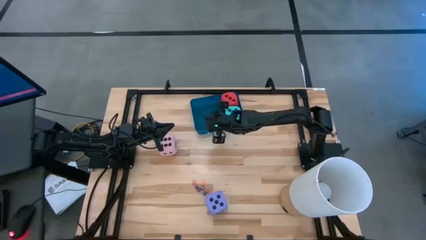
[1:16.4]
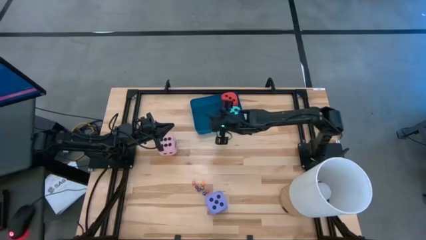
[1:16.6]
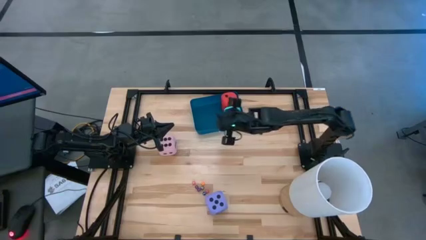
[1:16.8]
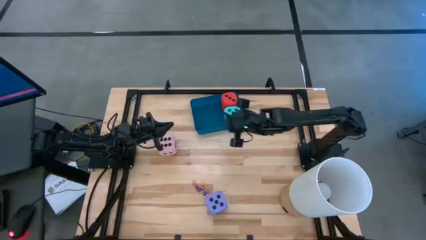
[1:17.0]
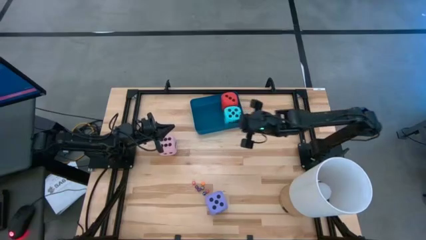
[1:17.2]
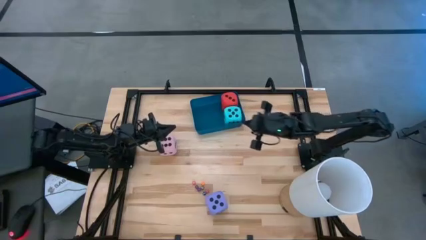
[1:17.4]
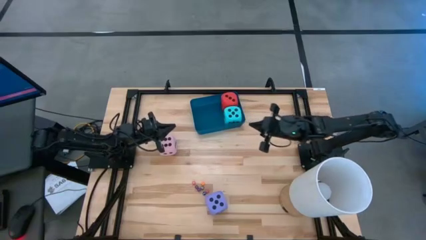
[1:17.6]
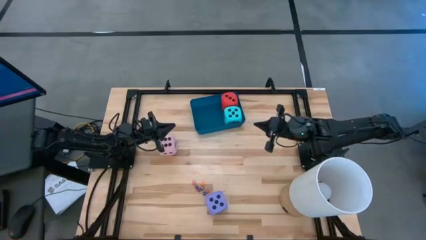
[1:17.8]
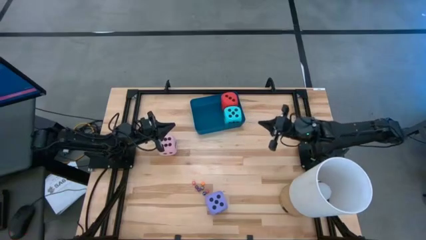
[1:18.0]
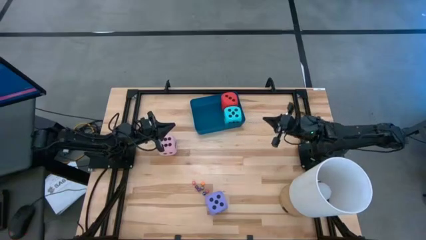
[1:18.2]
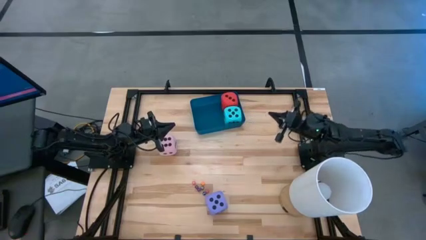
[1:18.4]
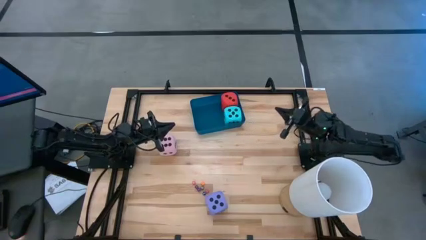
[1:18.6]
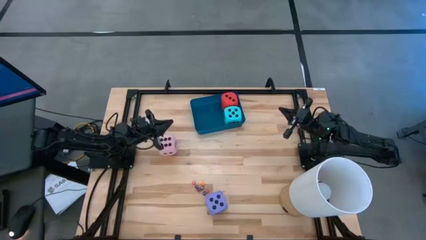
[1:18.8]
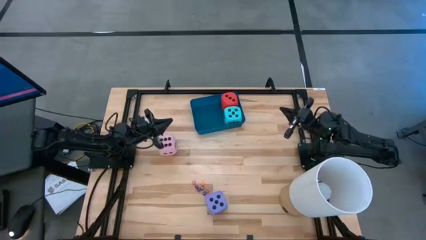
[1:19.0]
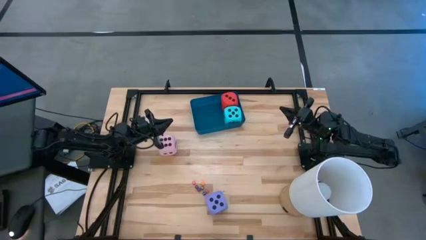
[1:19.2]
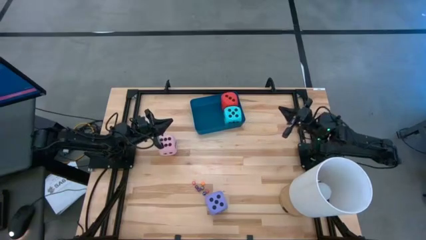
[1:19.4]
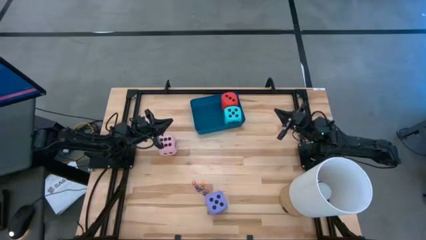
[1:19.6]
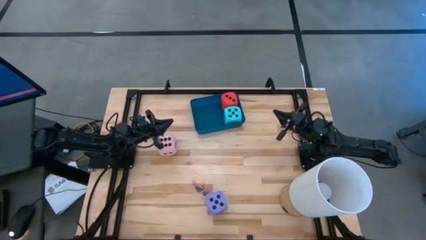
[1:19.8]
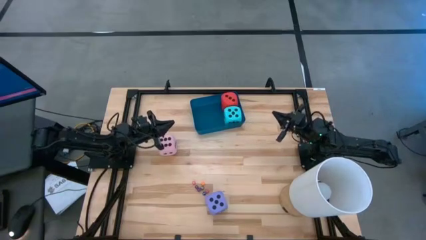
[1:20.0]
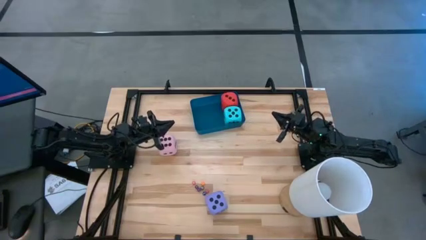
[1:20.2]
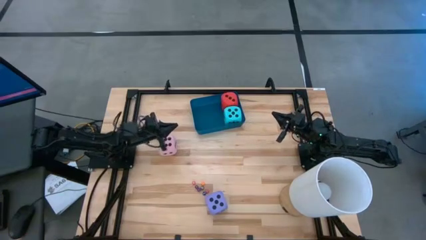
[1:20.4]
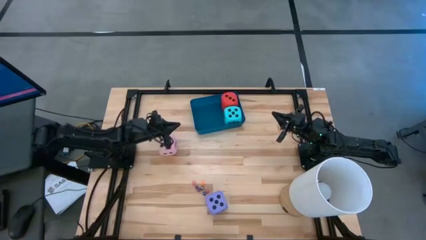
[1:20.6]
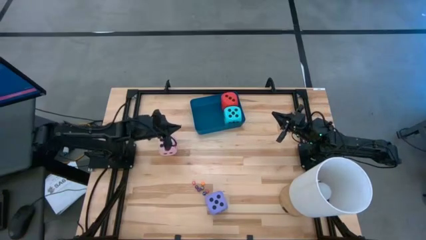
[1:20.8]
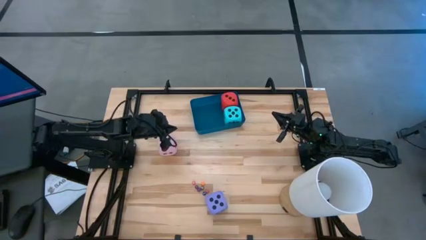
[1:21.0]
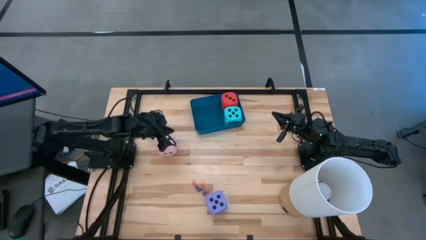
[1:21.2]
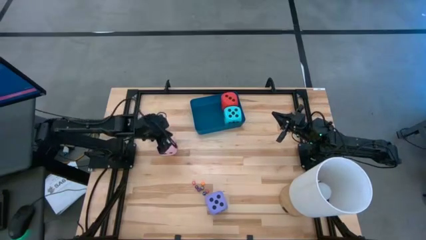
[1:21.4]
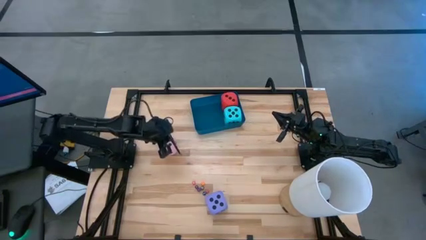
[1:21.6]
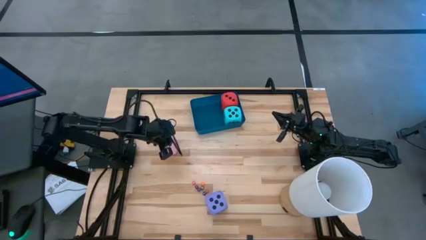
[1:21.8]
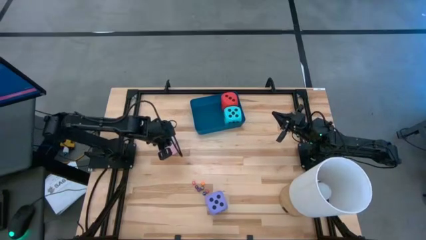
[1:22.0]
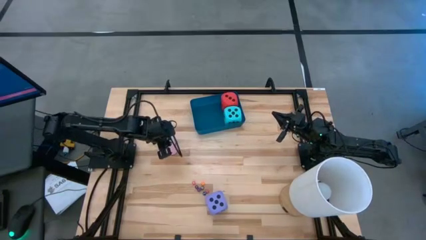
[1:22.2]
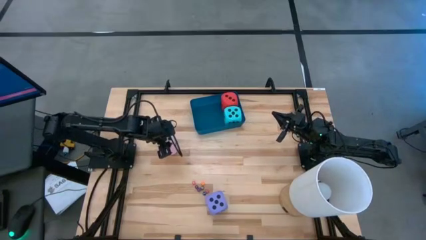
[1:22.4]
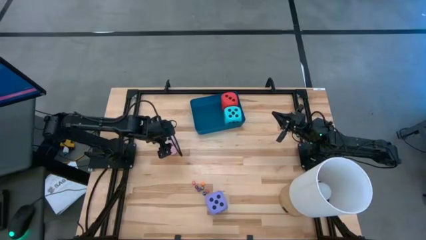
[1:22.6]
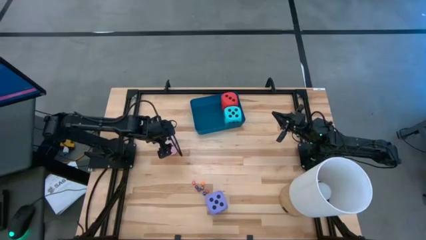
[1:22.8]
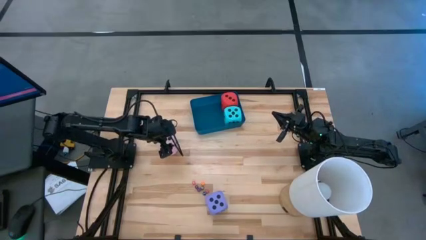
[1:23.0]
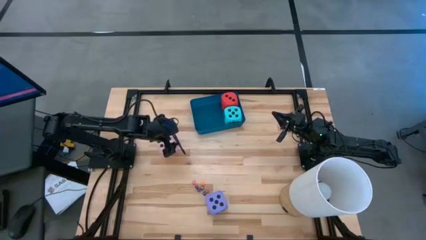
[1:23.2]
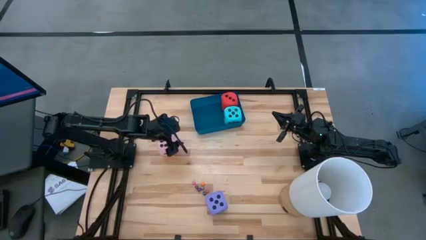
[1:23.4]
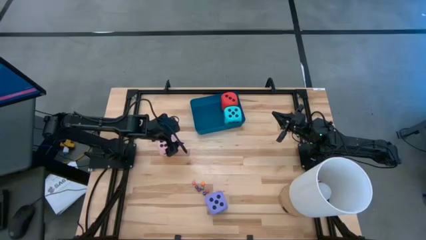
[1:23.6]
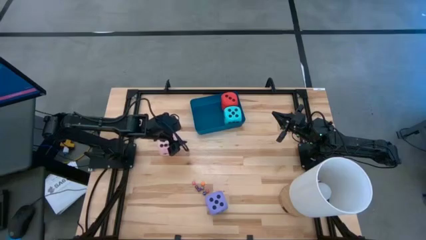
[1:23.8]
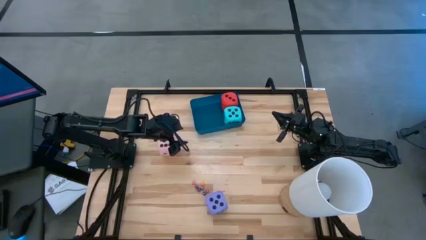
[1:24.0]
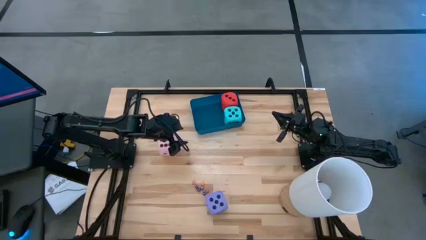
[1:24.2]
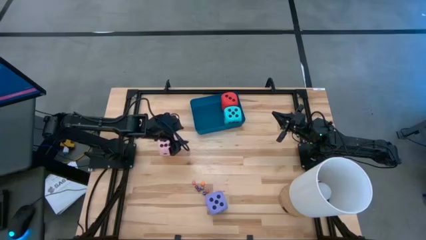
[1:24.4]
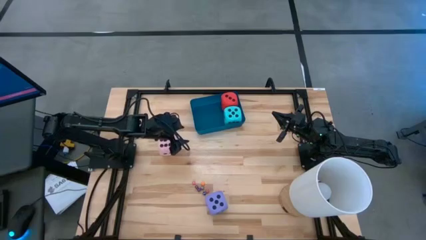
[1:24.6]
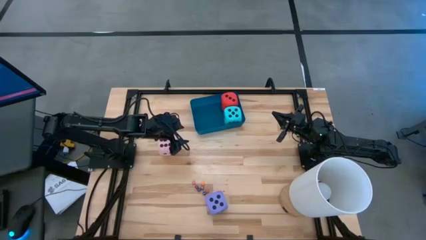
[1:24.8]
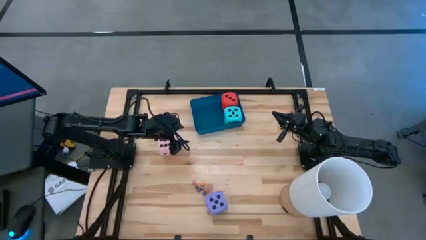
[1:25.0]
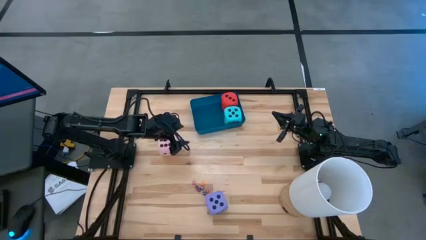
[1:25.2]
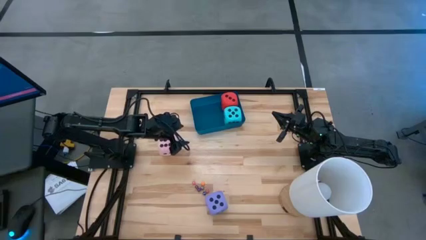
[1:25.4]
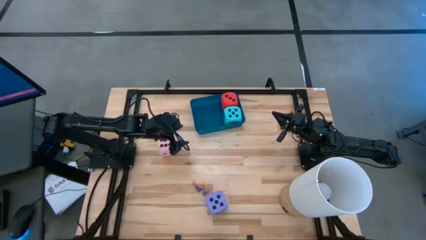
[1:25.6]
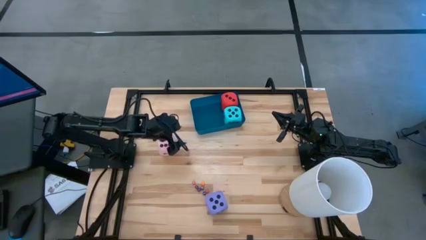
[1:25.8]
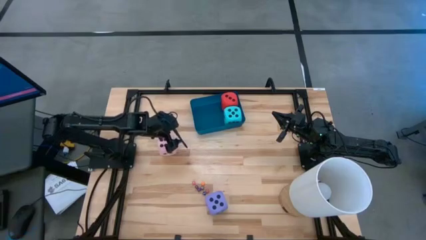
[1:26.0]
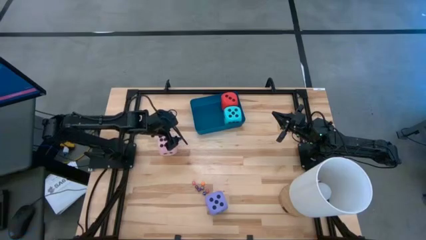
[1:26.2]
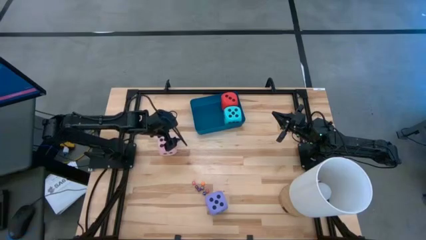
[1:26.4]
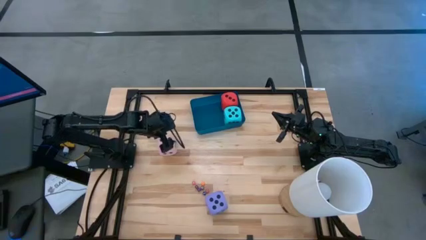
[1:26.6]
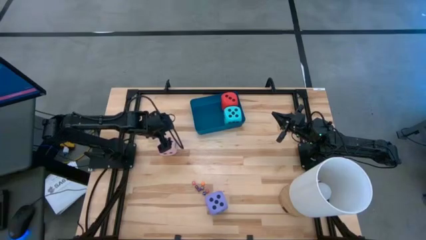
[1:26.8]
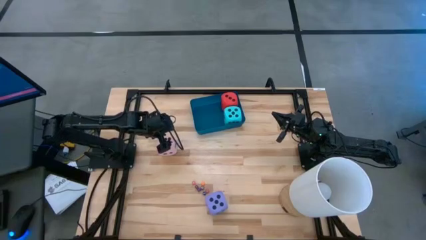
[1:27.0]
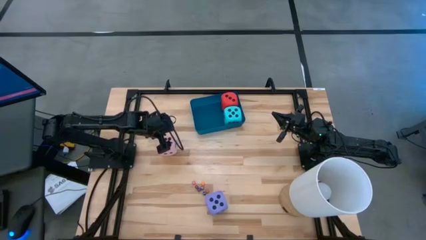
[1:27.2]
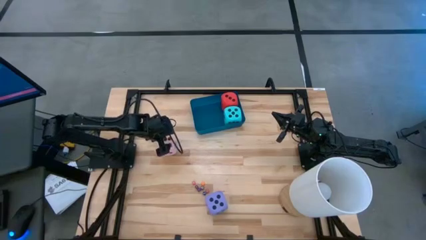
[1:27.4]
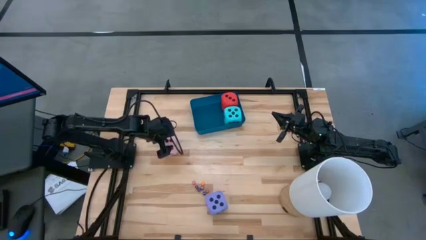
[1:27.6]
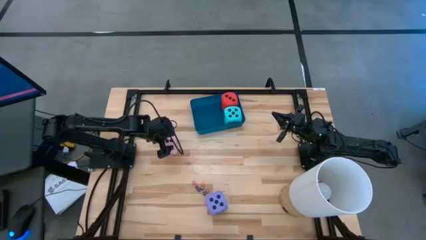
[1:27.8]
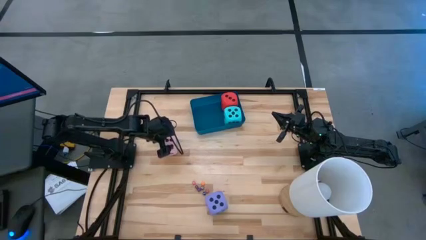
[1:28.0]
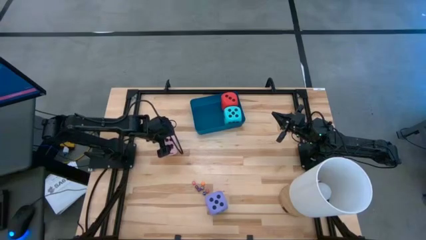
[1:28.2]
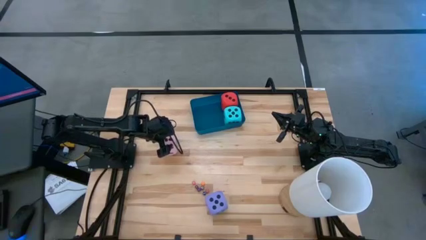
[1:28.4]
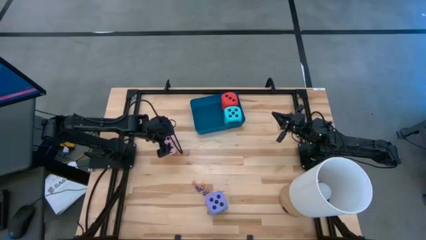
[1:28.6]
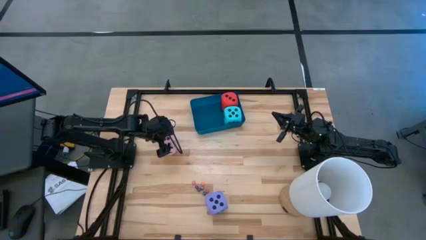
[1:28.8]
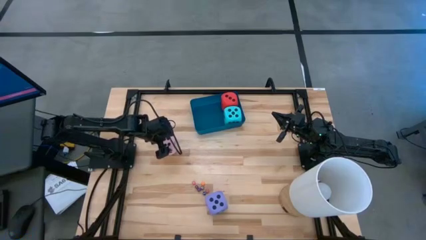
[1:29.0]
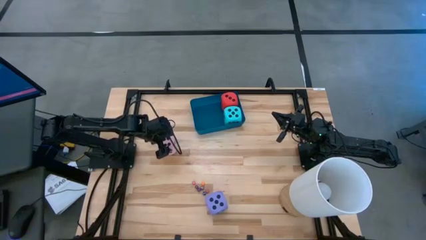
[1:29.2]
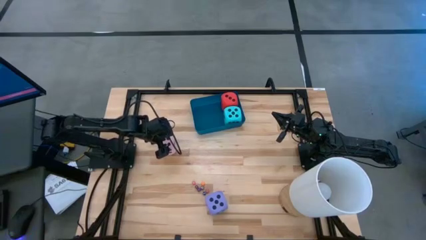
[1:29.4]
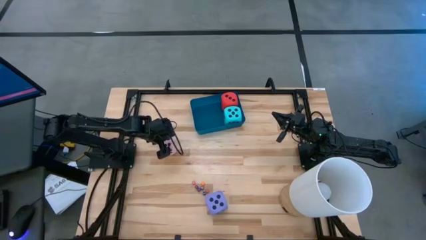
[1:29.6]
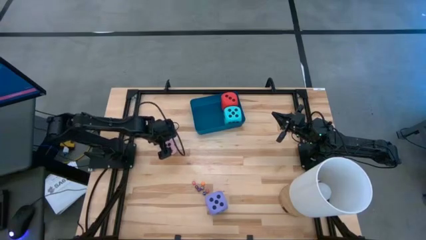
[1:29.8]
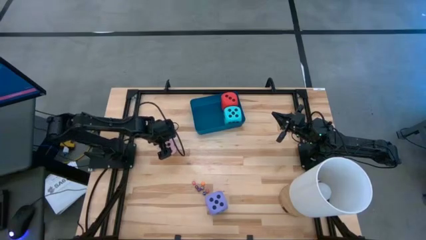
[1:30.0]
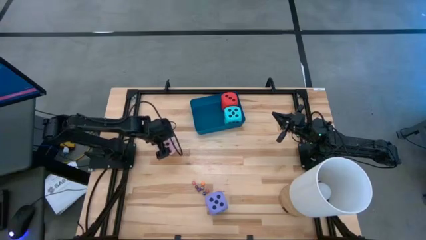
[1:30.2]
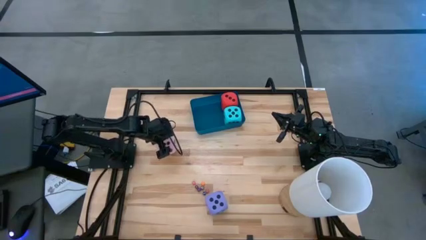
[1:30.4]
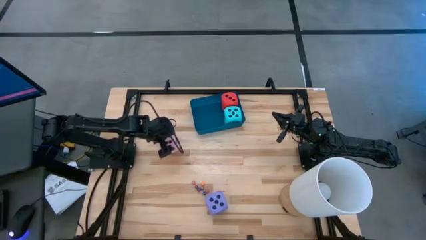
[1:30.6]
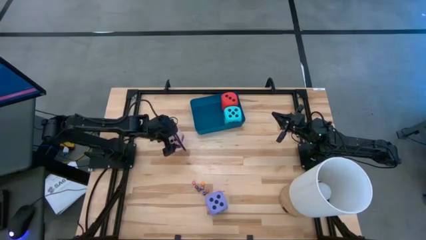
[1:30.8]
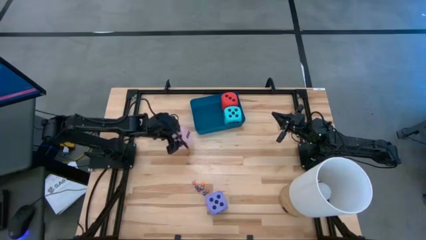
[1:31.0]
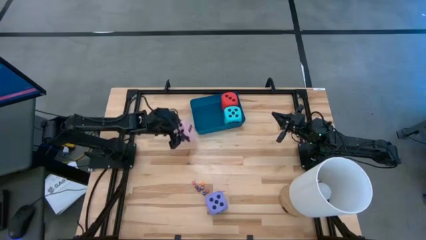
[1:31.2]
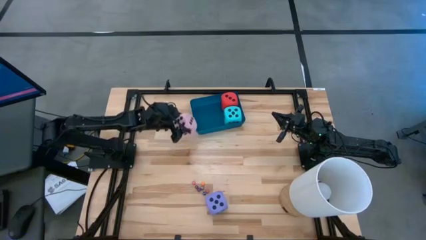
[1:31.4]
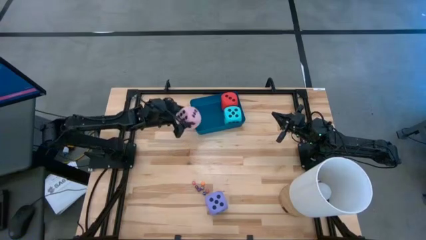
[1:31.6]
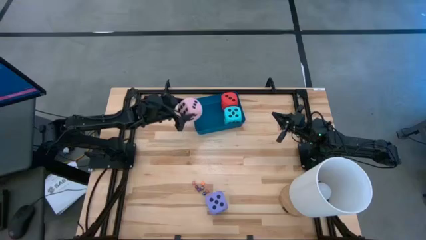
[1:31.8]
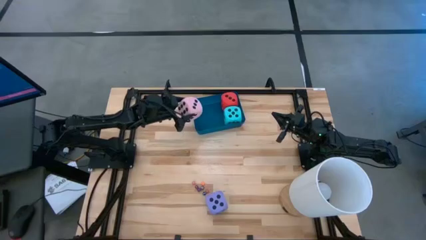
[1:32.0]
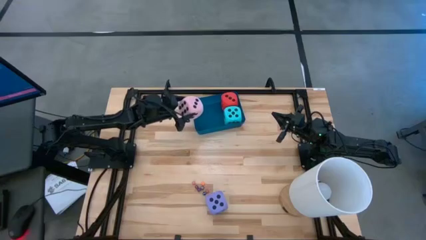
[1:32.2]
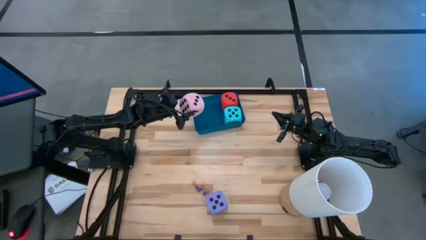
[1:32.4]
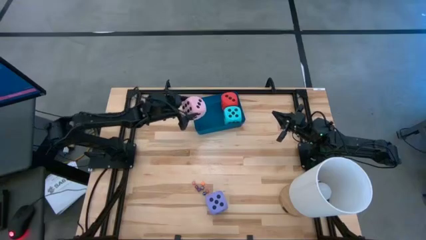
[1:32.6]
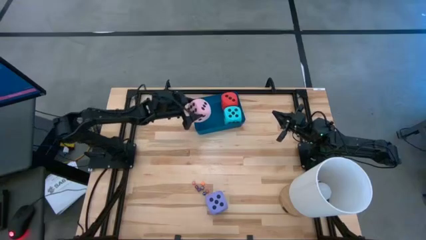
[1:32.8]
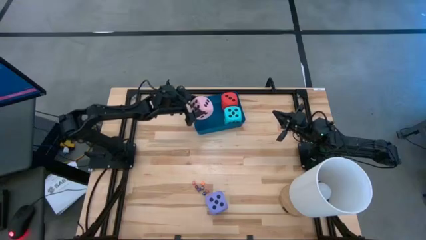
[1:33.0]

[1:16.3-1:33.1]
Task: Pick & Place Dice
Put the large pink dice into the blue bin
